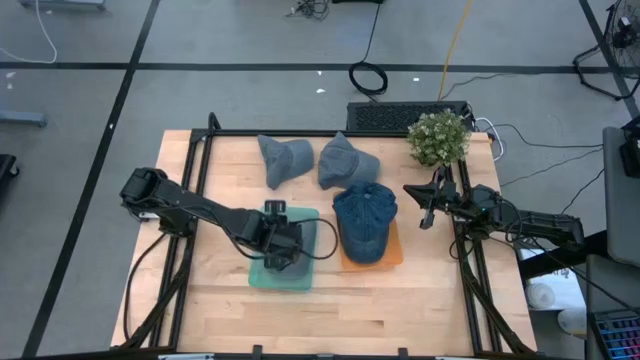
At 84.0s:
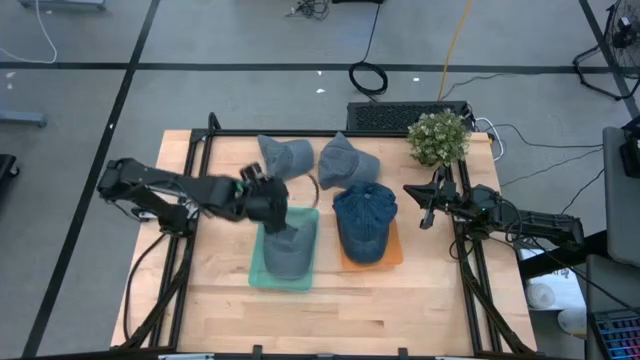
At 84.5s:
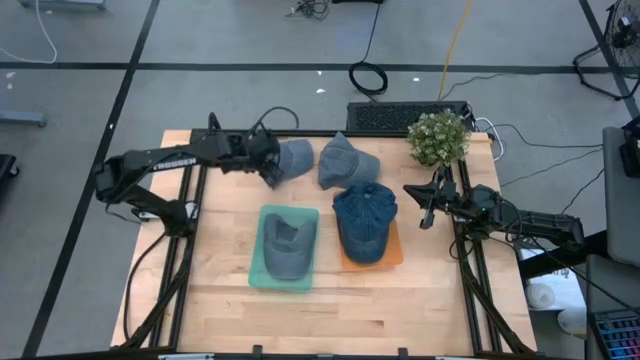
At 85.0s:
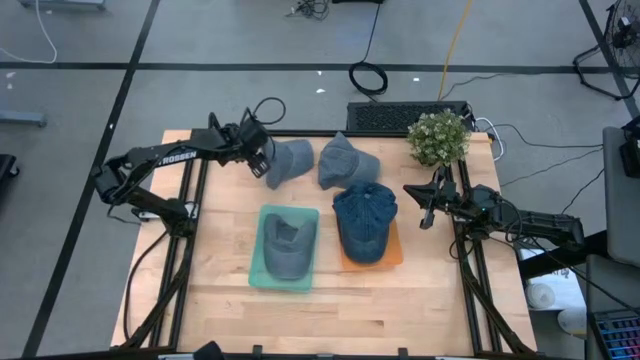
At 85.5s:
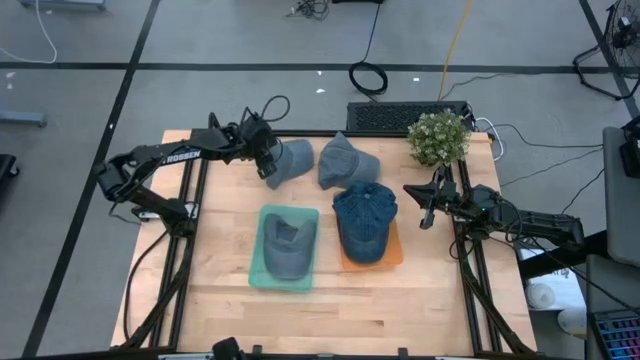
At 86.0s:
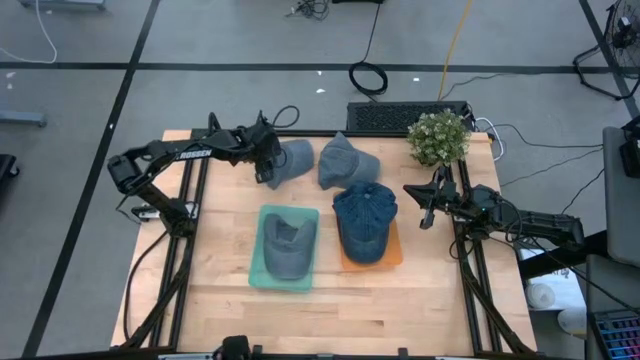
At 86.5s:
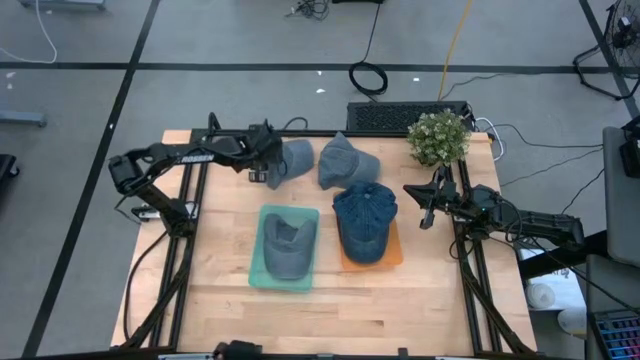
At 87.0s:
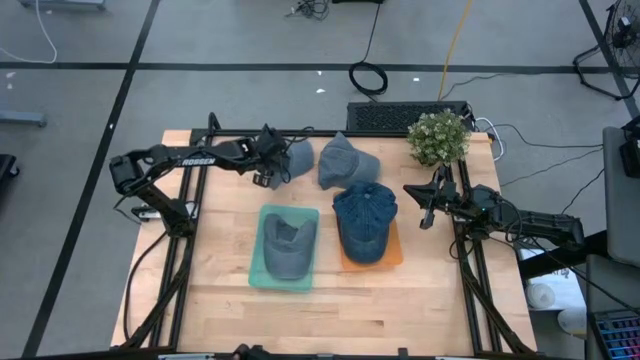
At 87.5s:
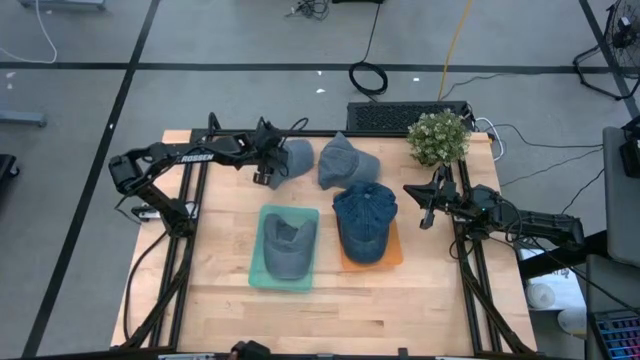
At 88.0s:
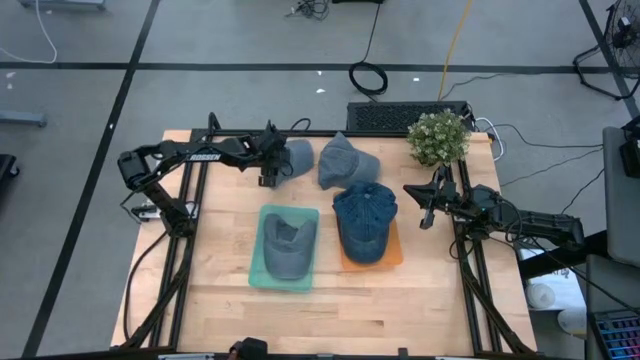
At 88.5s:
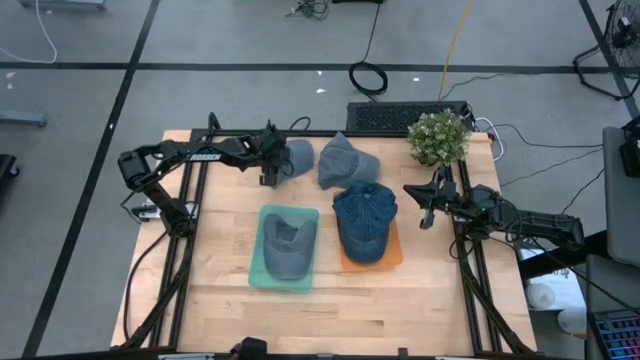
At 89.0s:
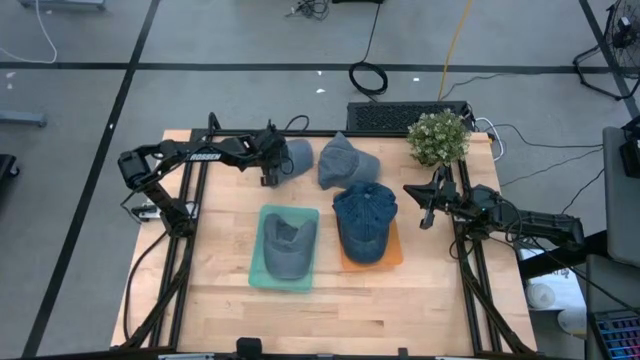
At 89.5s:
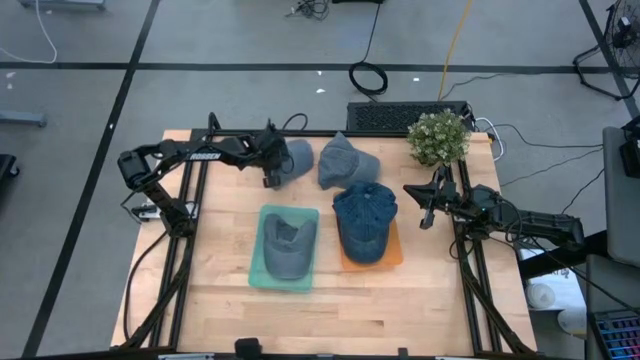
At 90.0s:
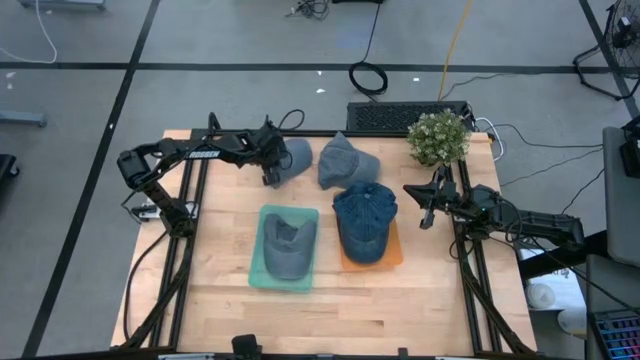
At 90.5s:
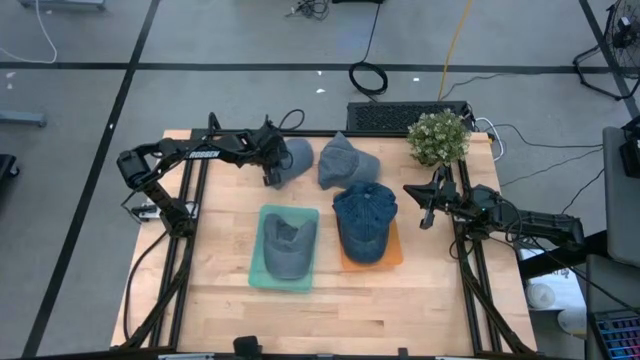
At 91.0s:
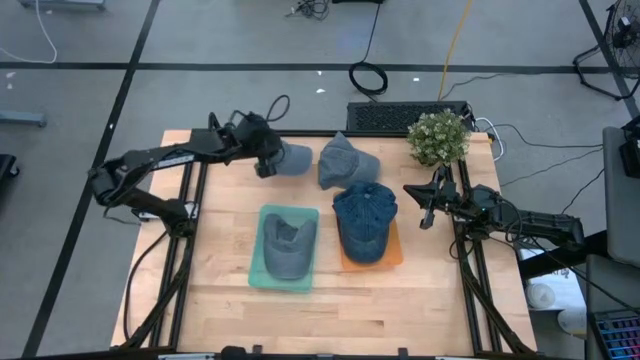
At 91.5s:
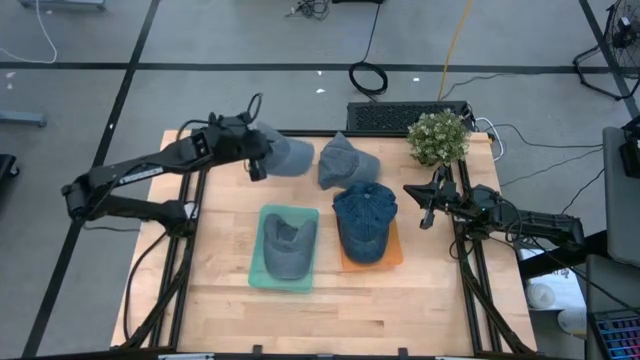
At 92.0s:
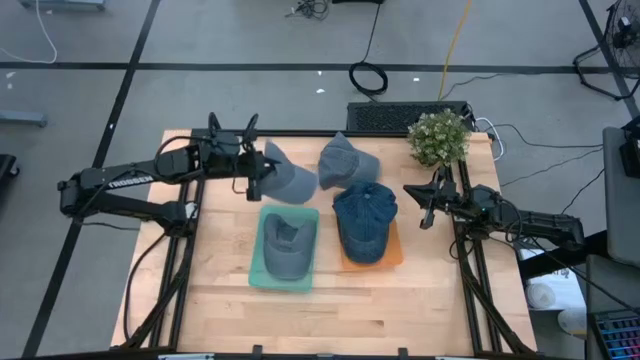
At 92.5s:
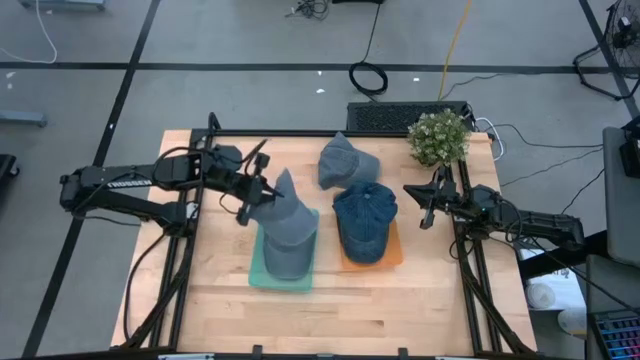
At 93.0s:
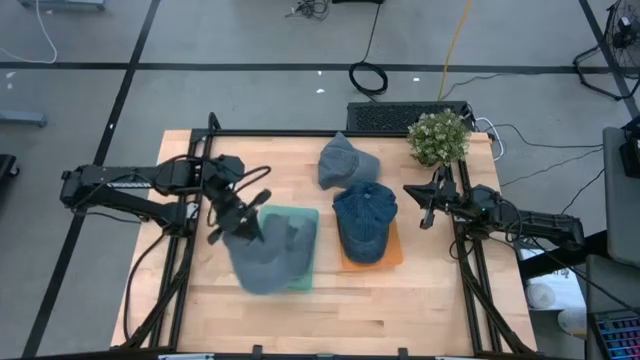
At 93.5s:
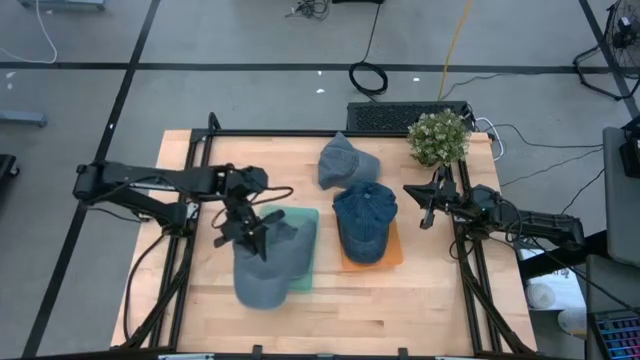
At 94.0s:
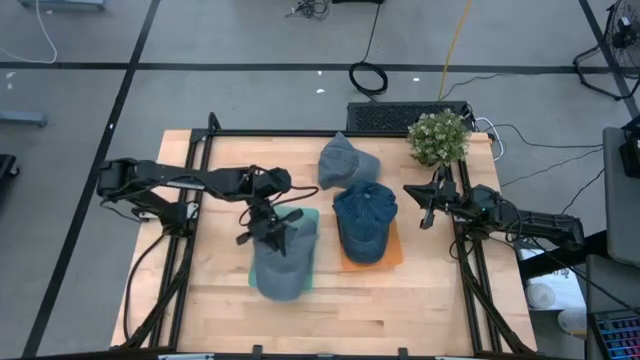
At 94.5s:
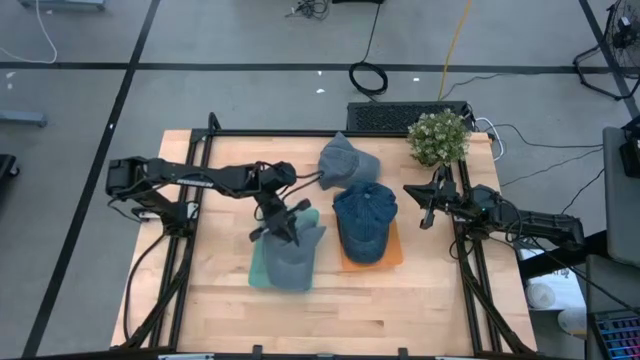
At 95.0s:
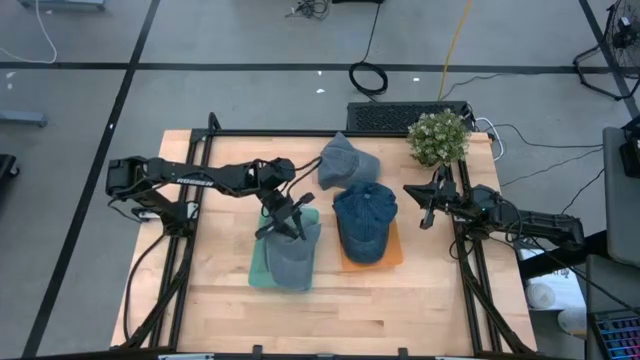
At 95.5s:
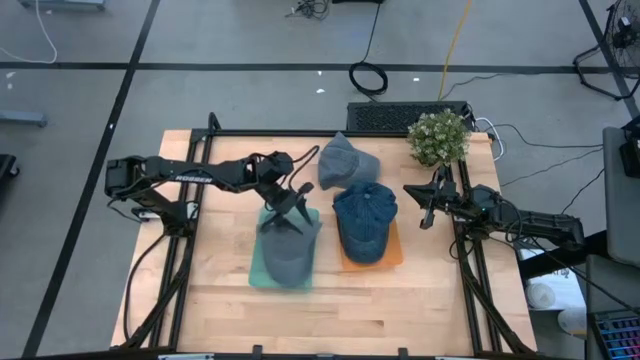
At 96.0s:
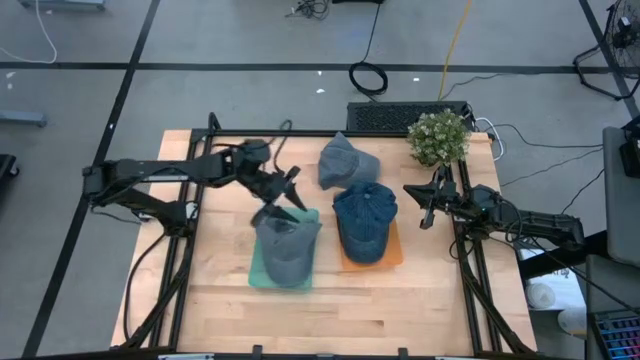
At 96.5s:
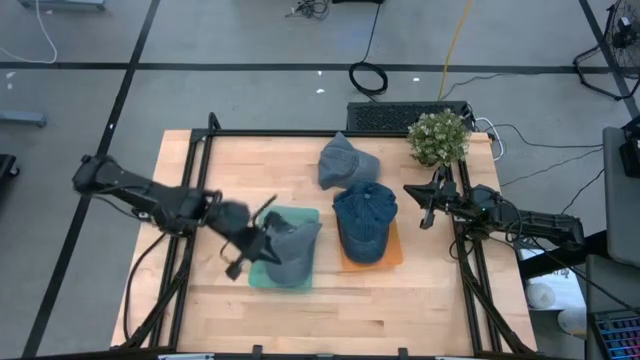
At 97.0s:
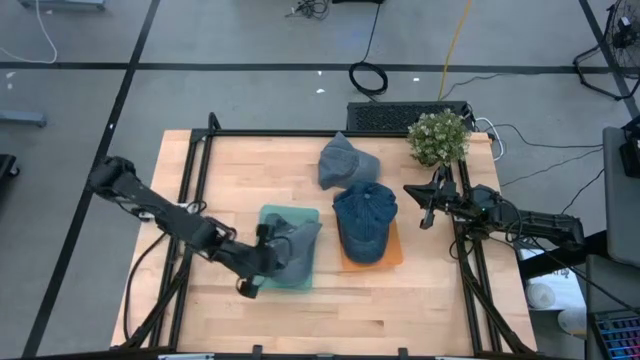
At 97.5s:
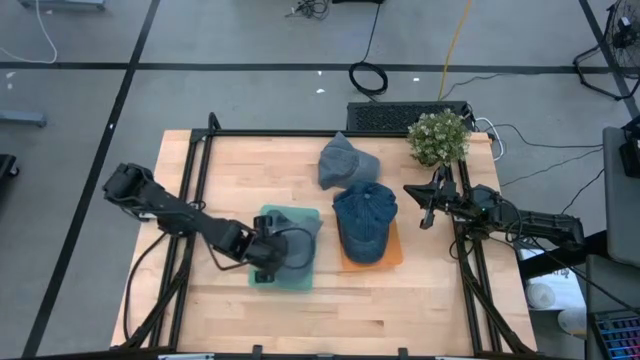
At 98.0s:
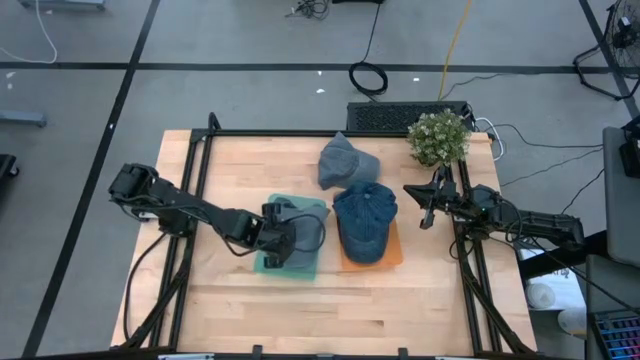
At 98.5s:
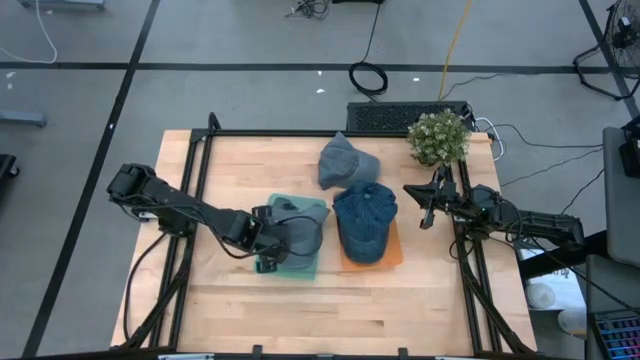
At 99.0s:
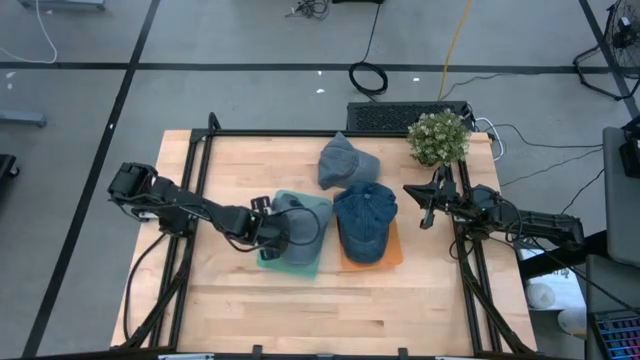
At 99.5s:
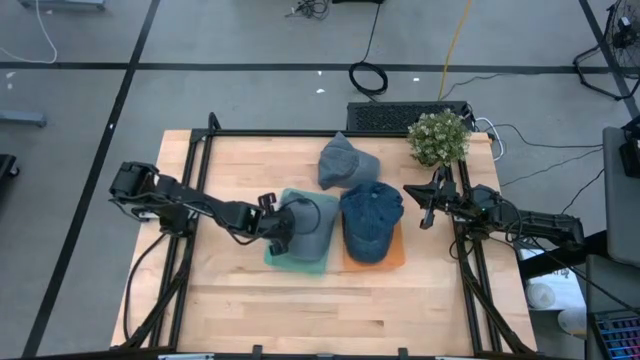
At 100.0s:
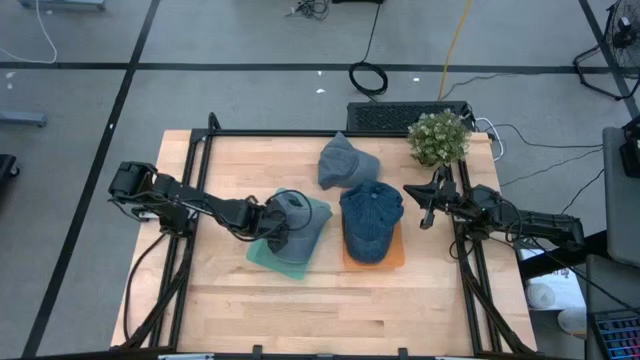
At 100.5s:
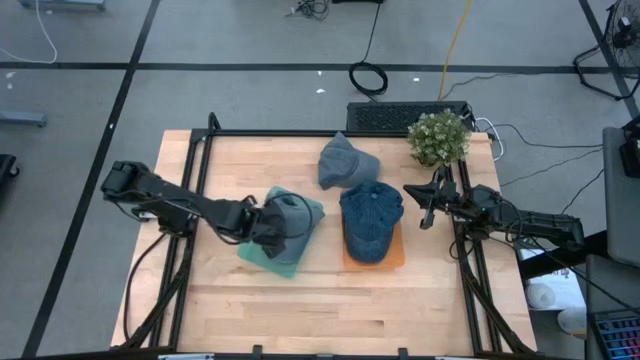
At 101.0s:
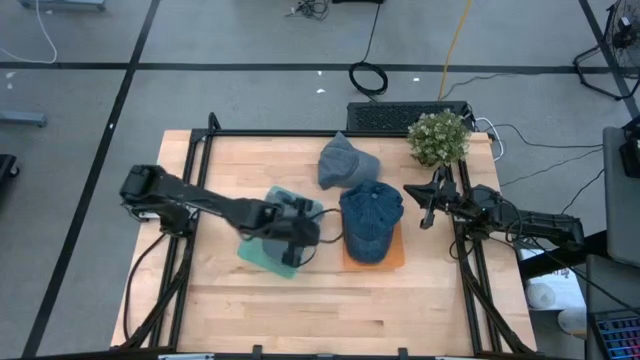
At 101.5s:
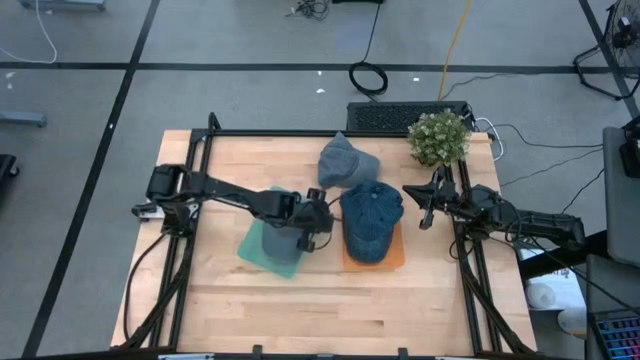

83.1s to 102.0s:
Task: Pick & Place hat
Put the left gray cap into the light blue bin

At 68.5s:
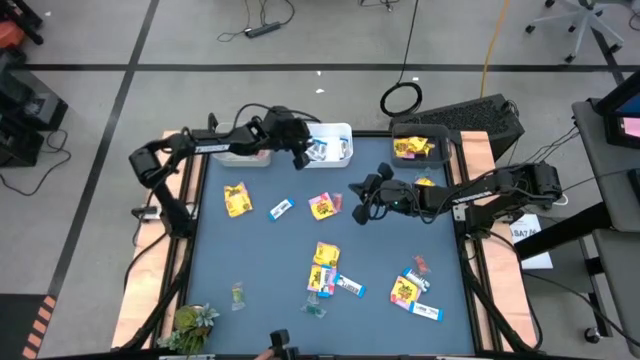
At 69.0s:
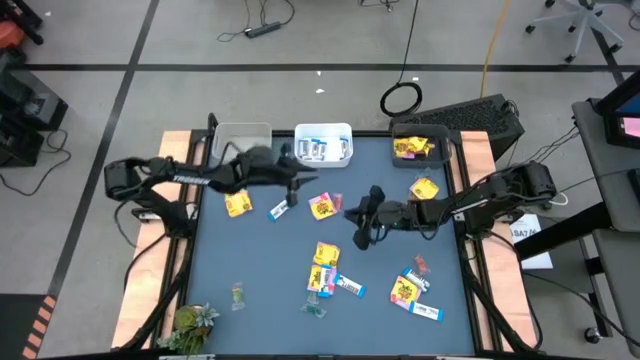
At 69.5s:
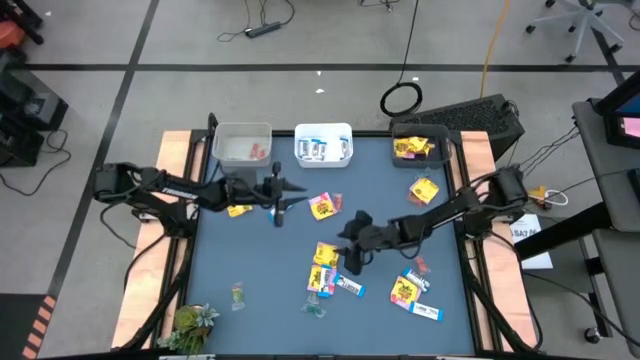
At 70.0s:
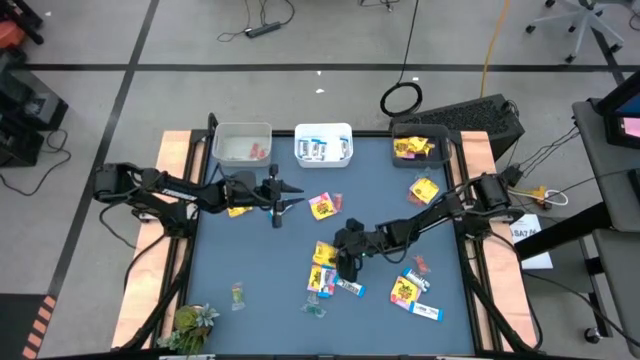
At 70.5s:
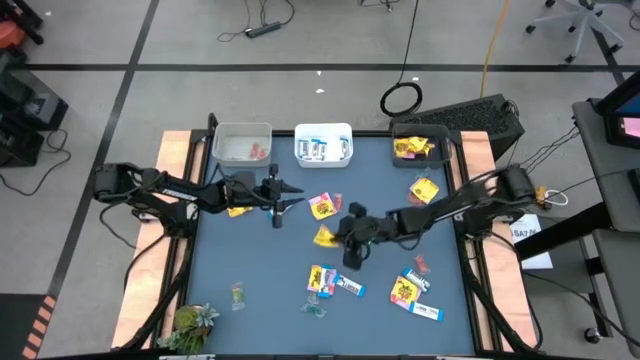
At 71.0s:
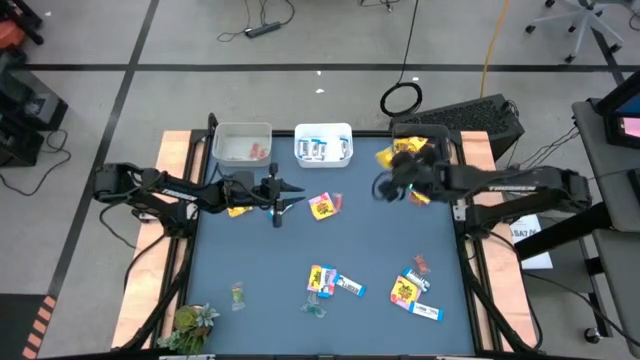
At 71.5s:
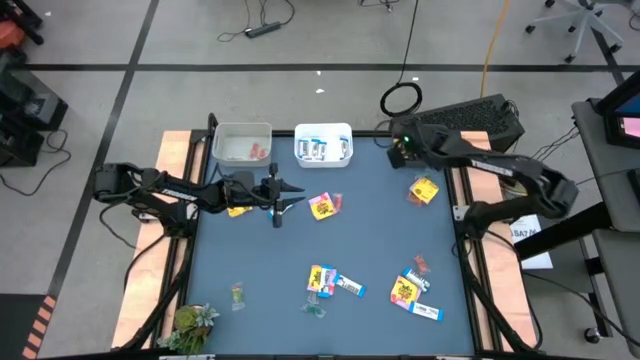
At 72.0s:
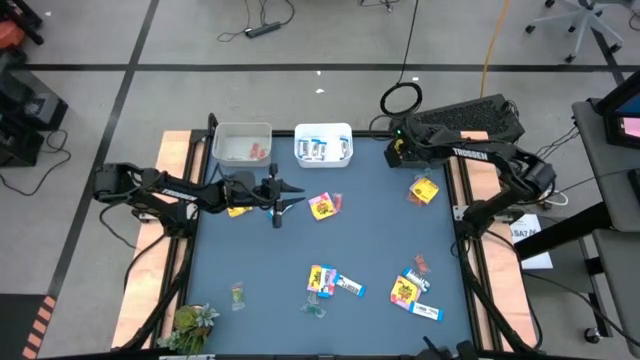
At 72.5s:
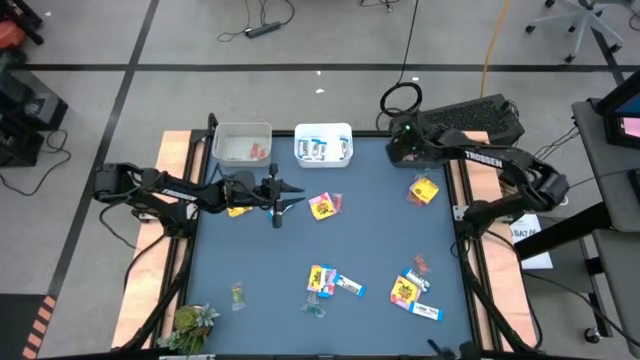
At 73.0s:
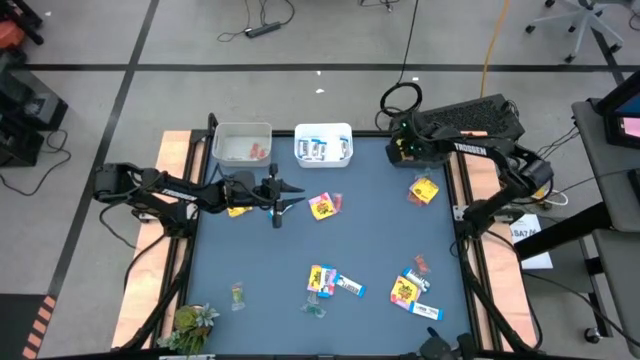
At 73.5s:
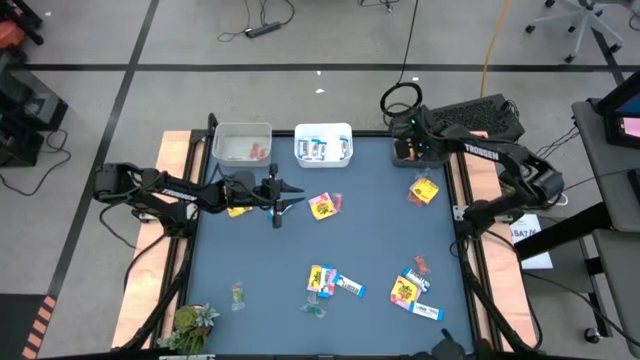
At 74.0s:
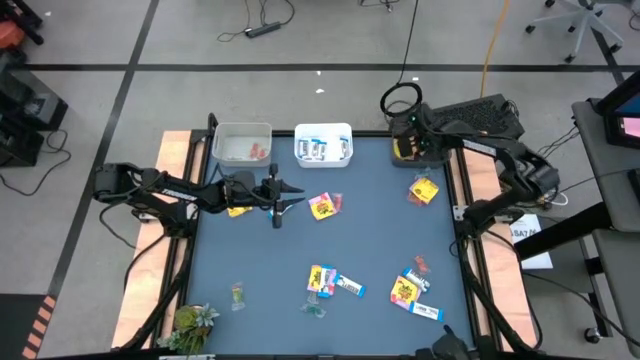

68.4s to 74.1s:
Task: Sort candy
Put the yellow candy pack into the black bin
